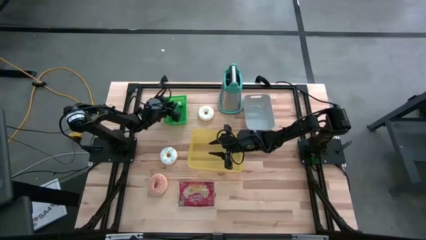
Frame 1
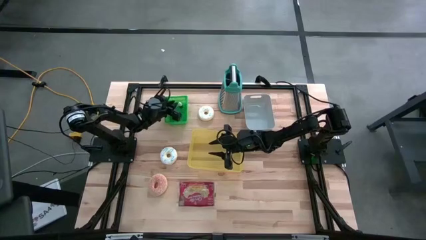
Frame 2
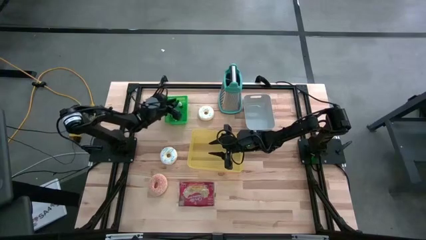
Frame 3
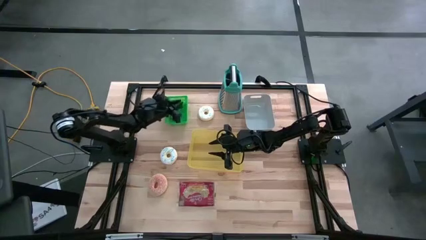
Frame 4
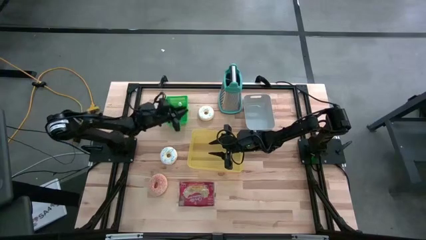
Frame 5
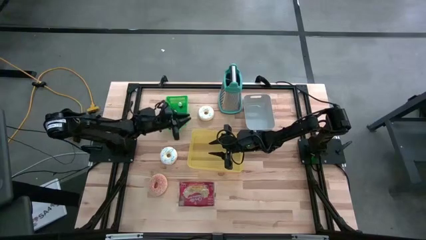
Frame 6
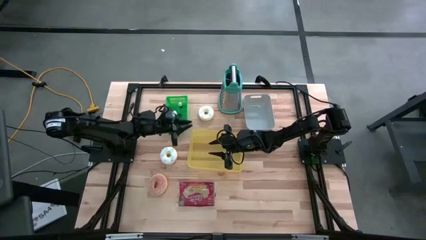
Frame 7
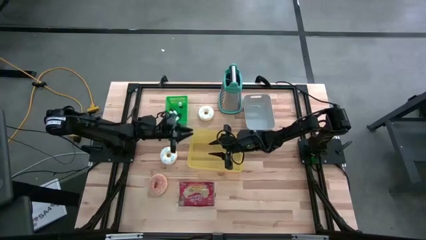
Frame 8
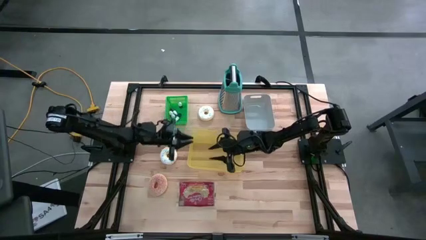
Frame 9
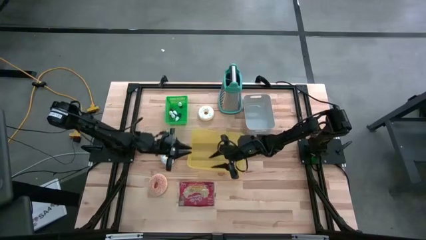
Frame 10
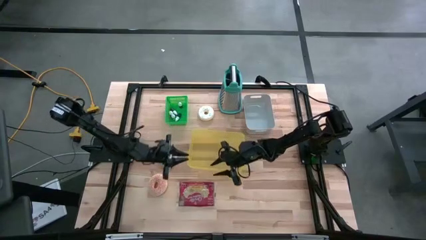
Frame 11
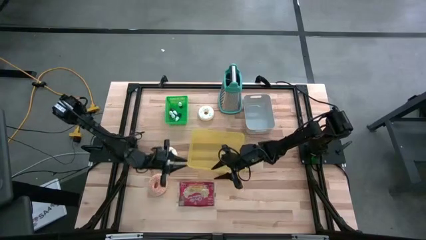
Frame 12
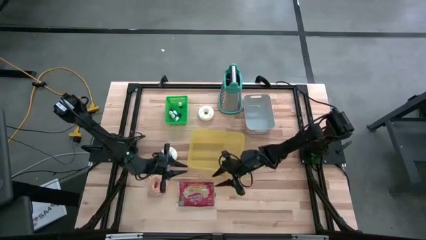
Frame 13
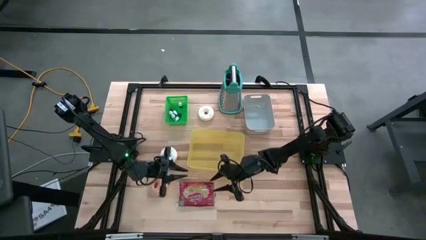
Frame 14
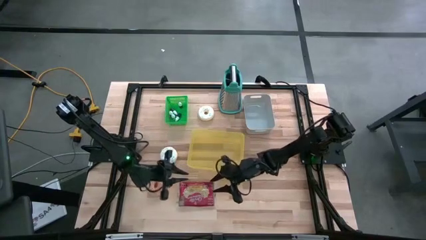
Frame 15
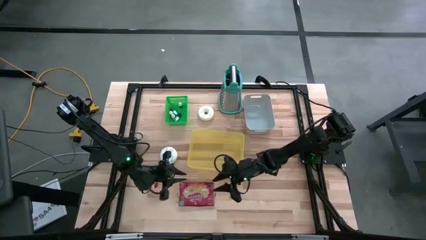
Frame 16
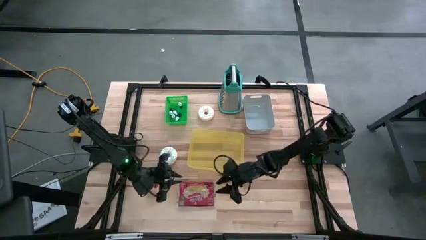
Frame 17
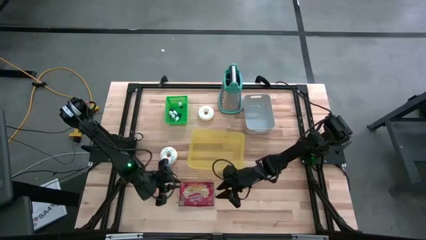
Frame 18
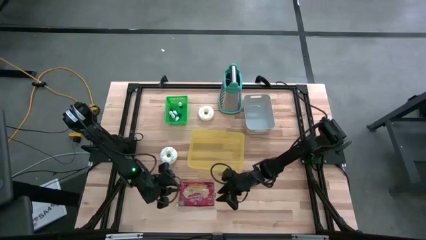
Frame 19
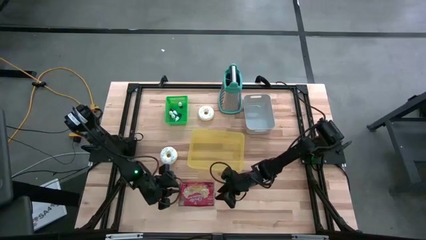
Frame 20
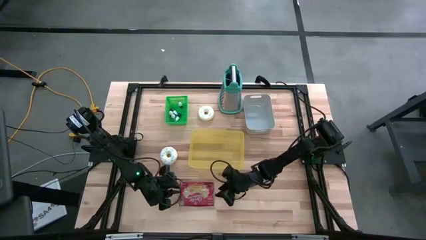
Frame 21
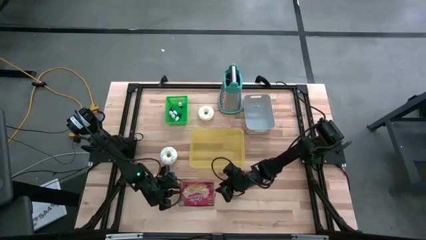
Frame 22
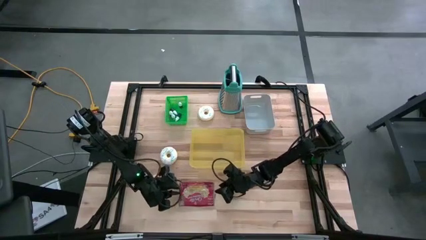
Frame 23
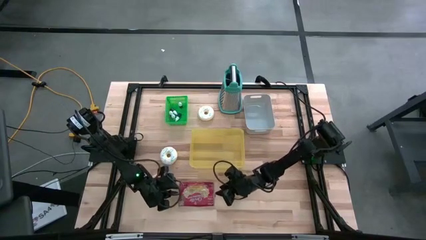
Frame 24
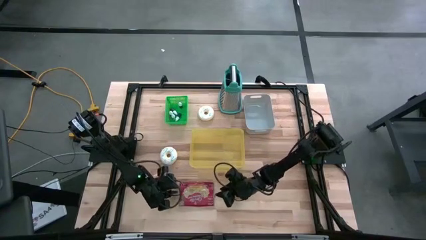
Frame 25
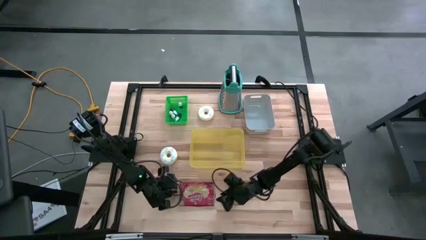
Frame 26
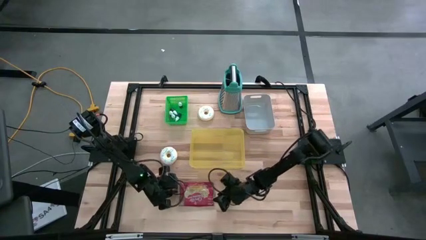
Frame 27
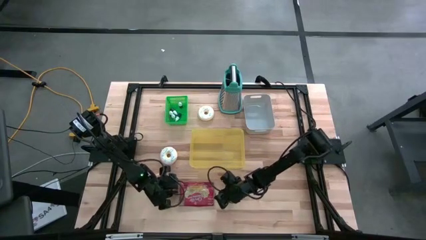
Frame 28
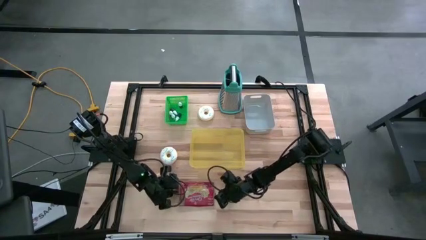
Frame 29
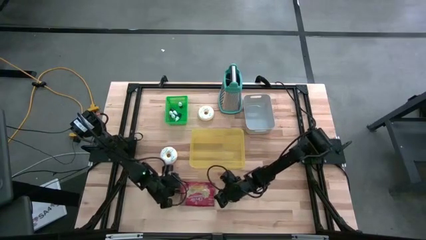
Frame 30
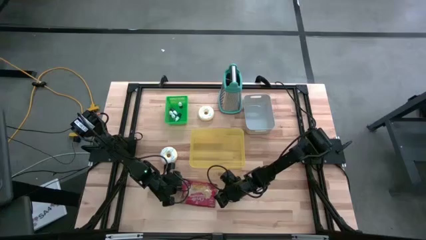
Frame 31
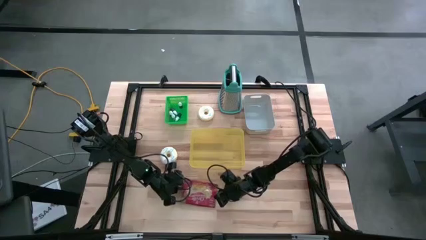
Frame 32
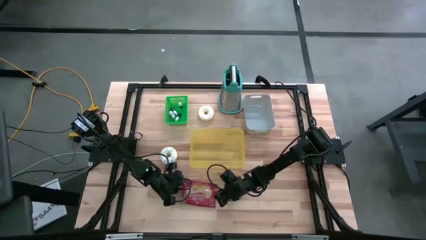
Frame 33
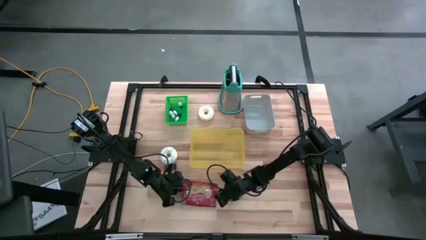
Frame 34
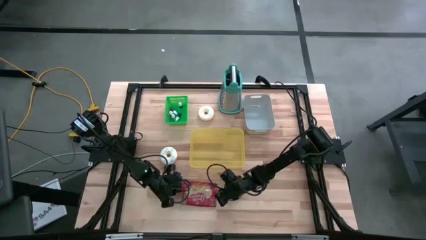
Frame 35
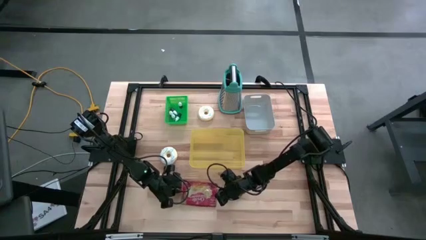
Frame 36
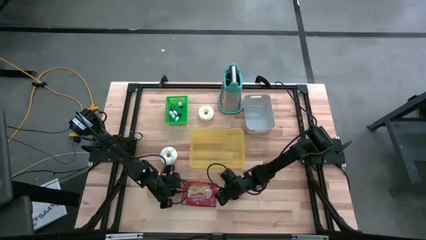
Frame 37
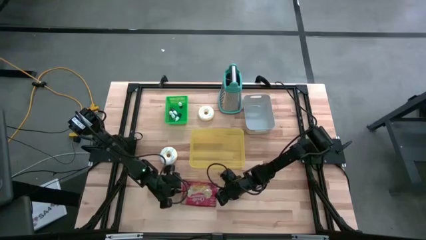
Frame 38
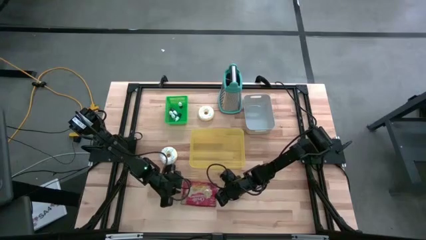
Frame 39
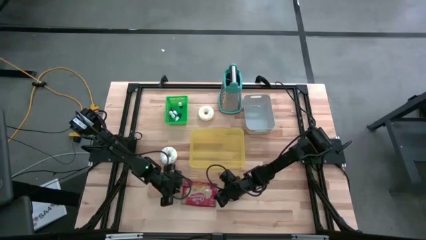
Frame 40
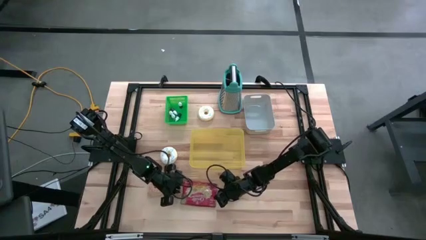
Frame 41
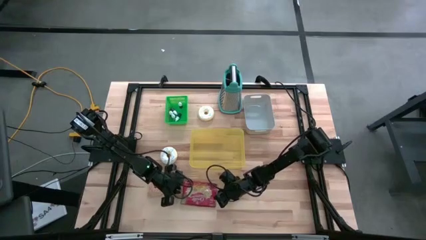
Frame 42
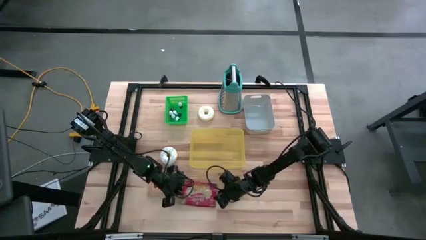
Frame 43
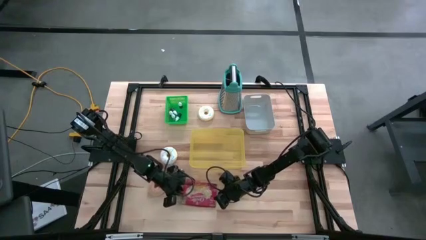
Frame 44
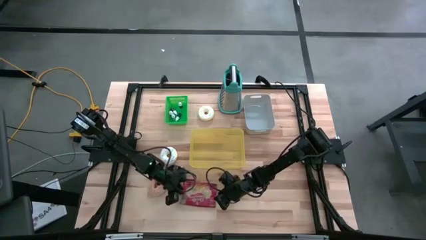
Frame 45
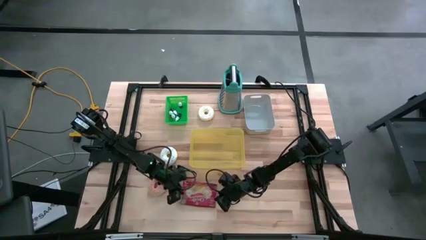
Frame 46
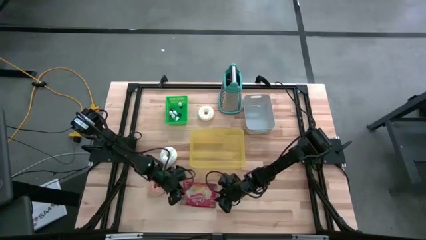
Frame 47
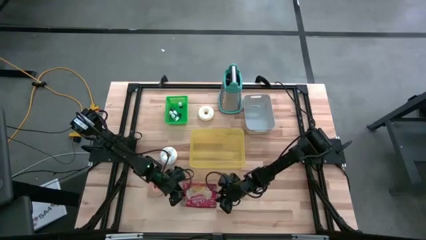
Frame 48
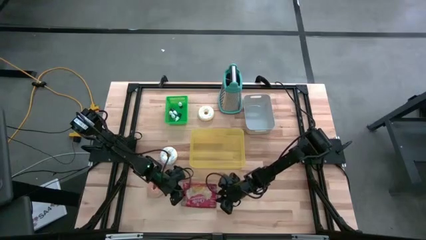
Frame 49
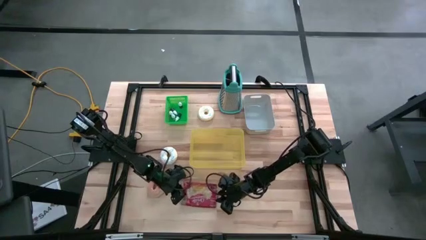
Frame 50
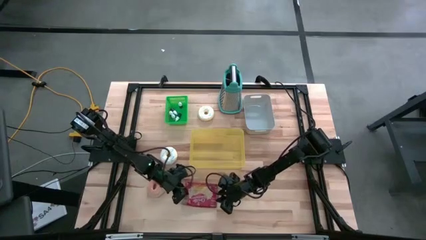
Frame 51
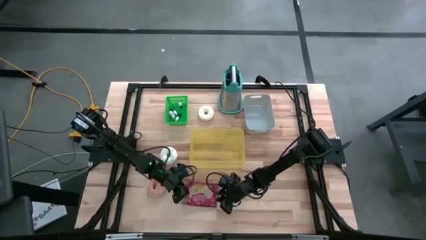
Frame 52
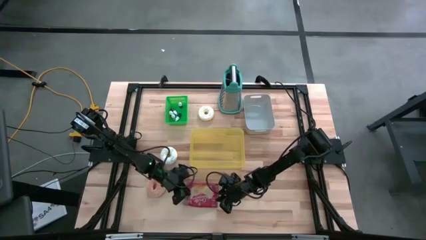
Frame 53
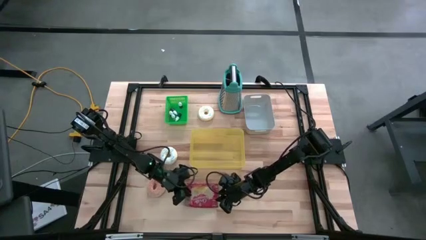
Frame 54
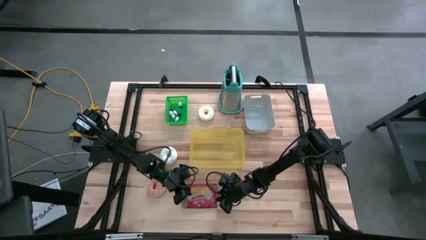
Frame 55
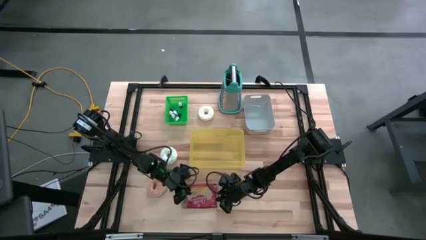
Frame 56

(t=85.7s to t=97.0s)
Put the red popcorn bag into the yellow bin

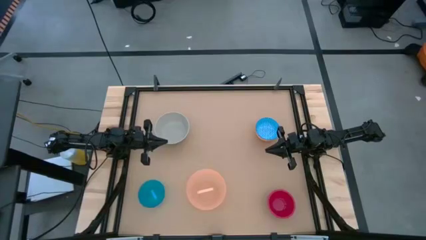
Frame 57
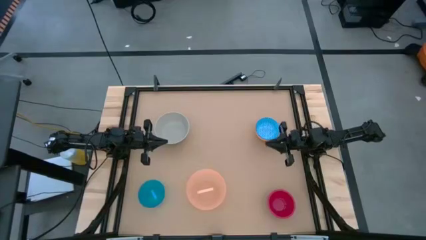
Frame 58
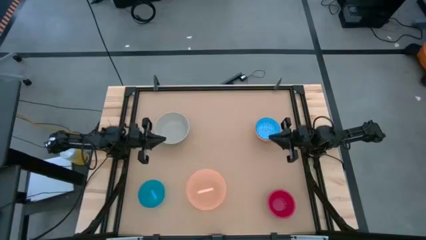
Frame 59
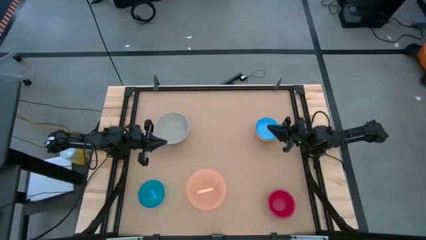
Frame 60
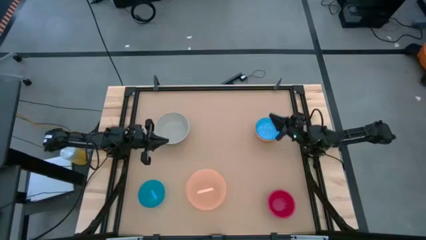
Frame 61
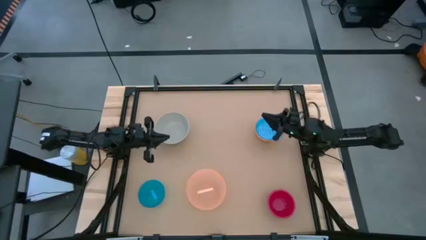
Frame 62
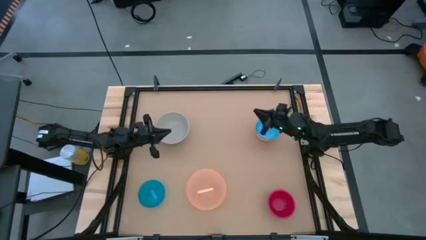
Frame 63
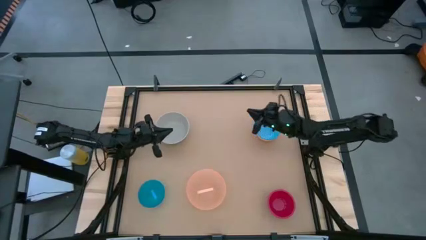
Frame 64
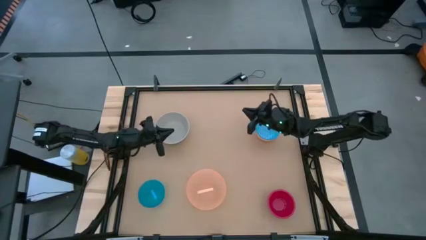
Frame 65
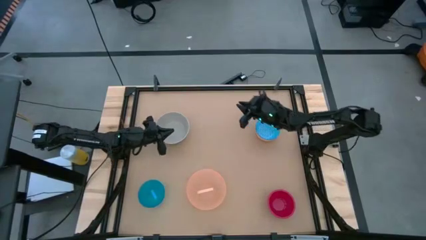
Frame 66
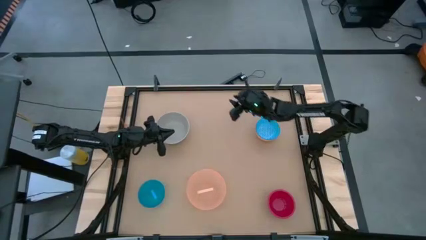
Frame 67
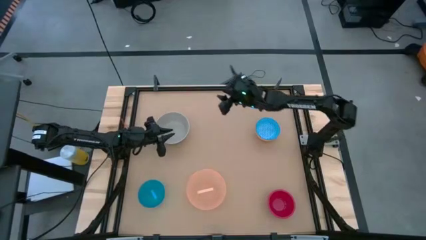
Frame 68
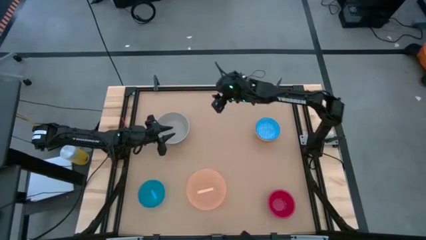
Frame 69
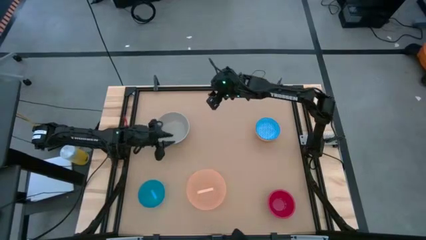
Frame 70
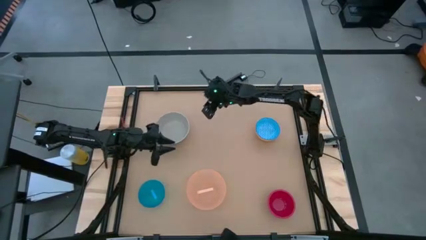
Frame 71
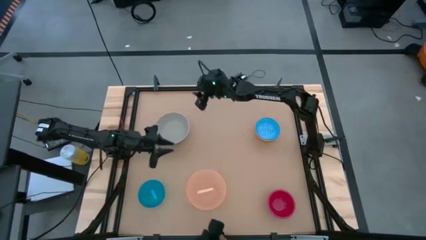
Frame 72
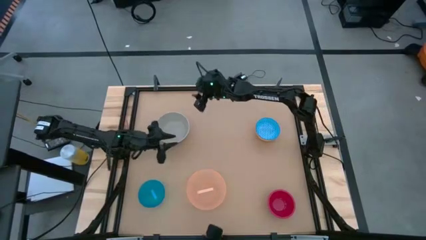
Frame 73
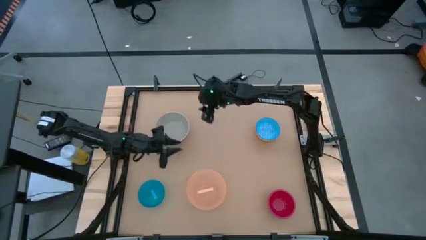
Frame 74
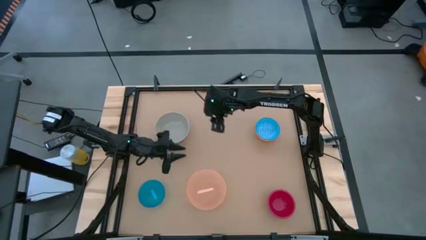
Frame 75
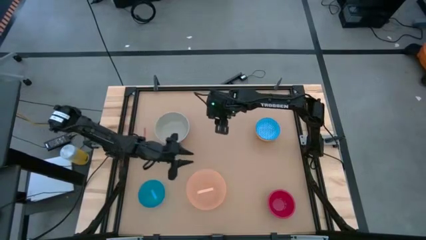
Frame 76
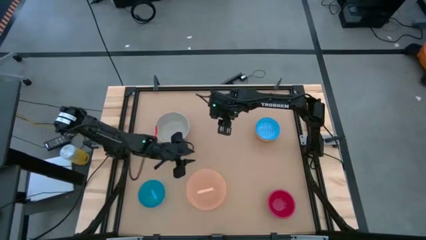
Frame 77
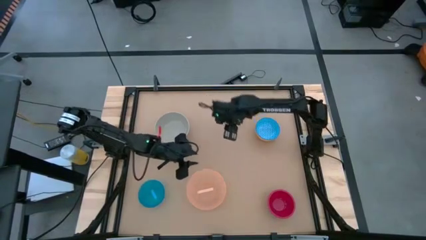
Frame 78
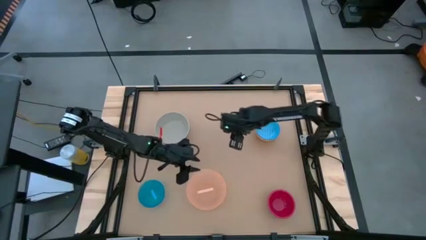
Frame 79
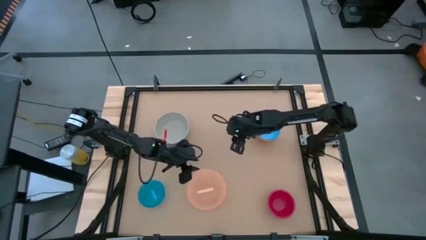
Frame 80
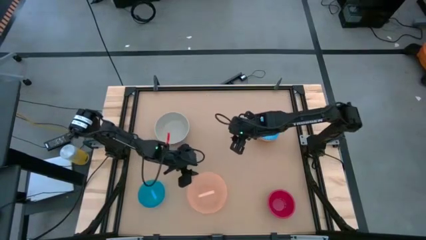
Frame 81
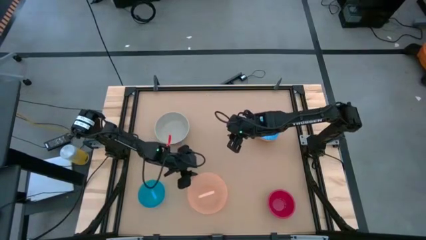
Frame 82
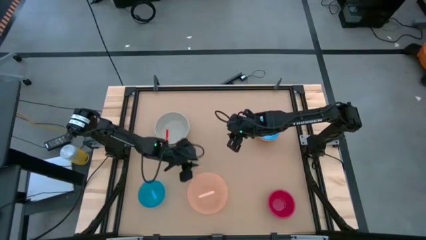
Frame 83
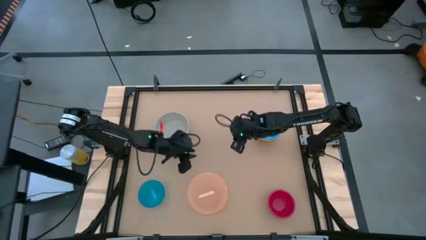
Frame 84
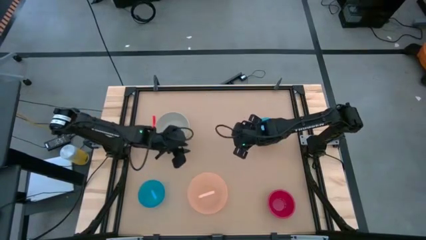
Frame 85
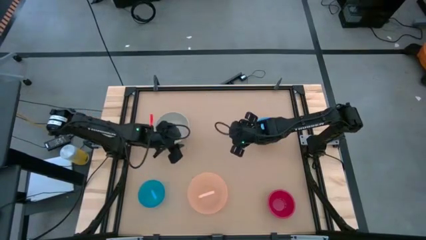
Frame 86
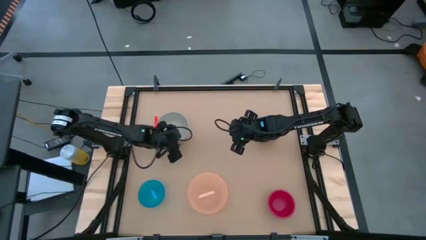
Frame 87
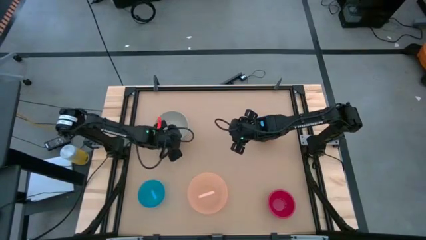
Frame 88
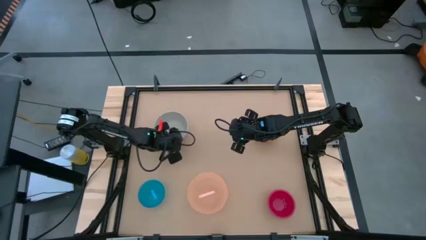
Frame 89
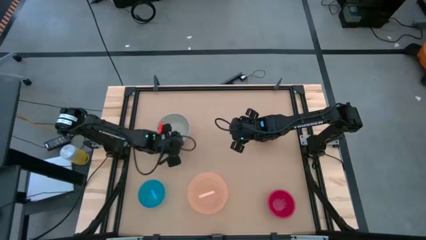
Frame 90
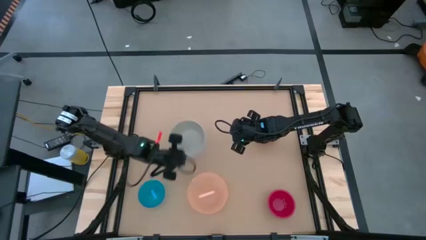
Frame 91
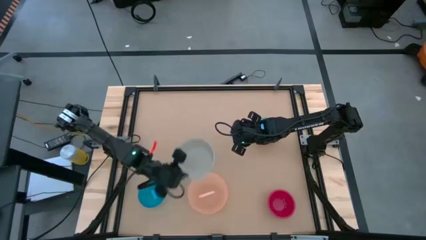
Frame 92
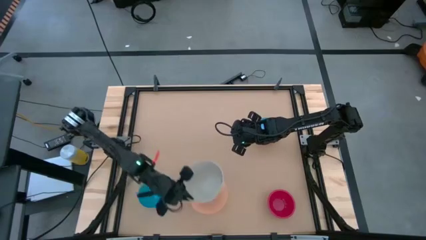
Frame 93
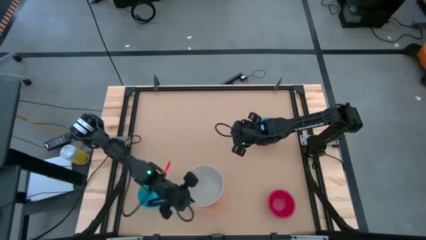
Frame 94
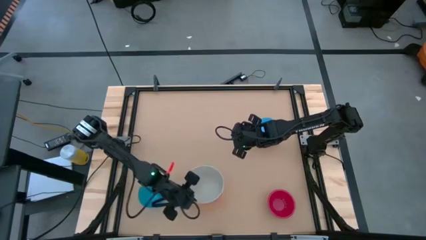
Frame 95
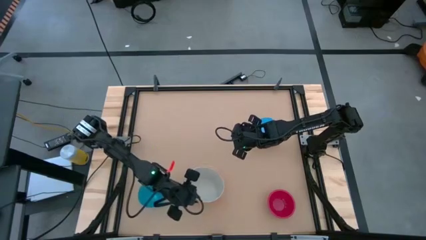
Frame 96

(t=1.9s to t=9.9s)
Stack the gray bowl on the orange bowl
